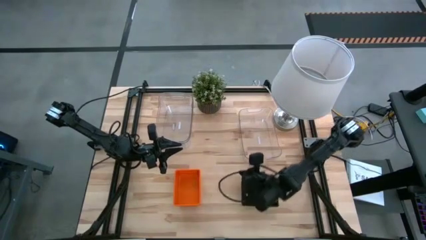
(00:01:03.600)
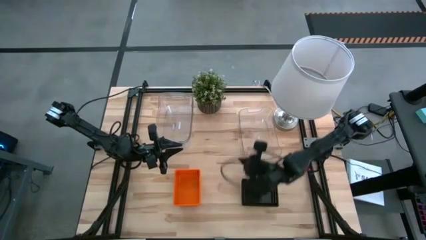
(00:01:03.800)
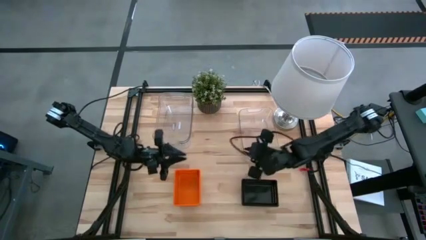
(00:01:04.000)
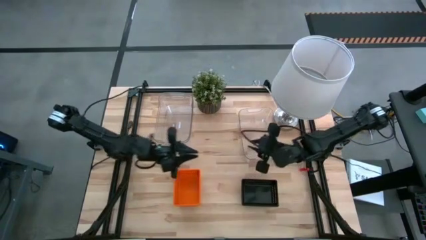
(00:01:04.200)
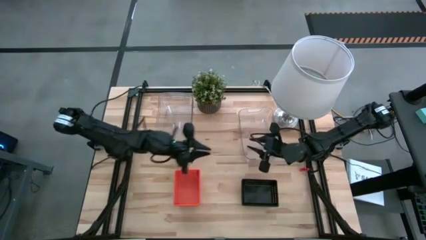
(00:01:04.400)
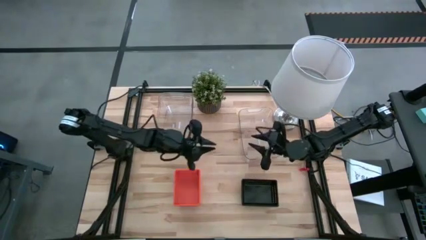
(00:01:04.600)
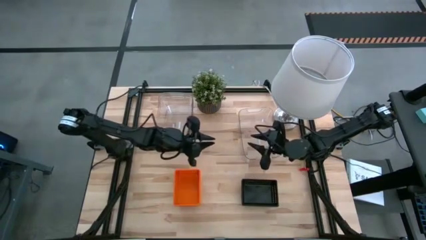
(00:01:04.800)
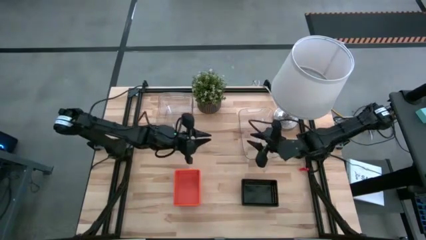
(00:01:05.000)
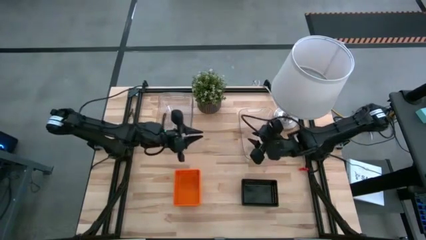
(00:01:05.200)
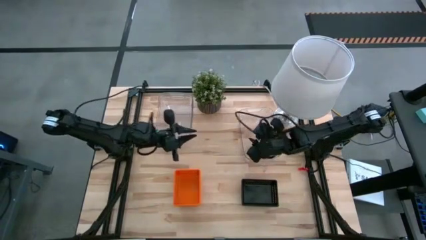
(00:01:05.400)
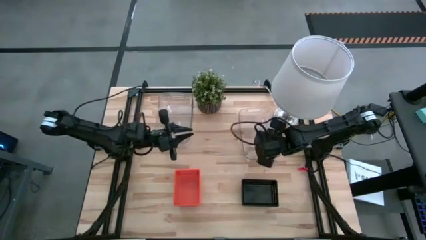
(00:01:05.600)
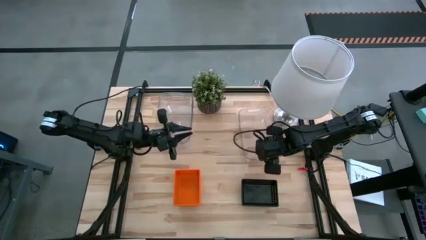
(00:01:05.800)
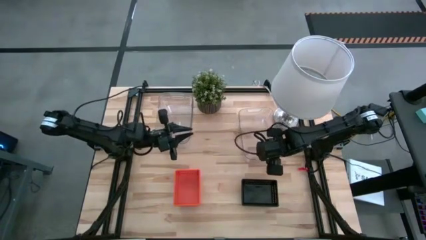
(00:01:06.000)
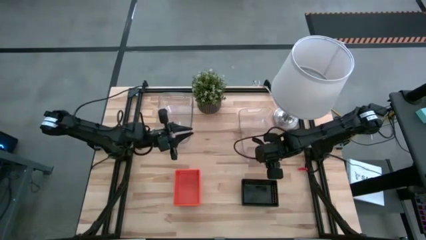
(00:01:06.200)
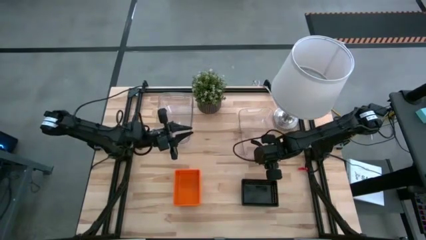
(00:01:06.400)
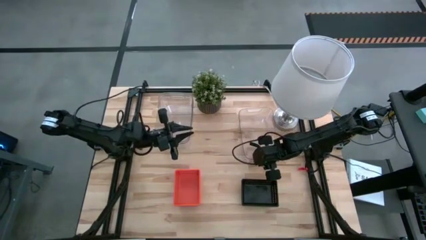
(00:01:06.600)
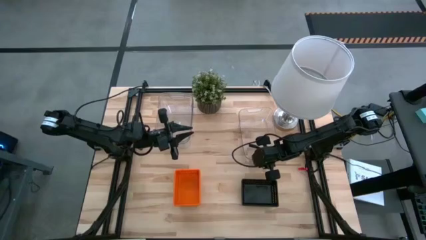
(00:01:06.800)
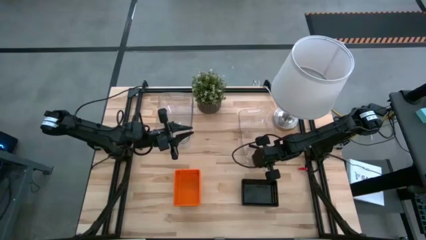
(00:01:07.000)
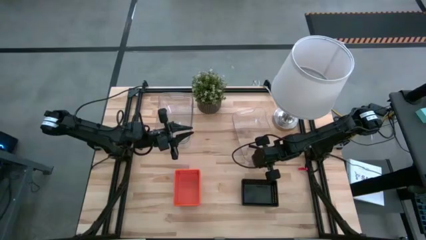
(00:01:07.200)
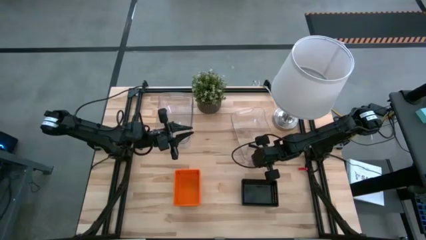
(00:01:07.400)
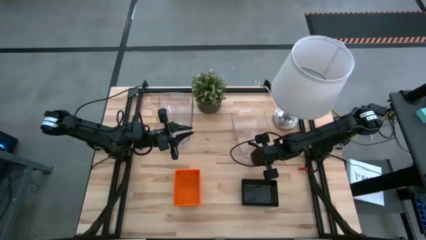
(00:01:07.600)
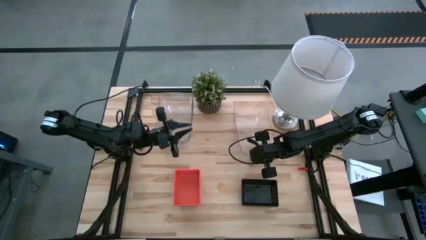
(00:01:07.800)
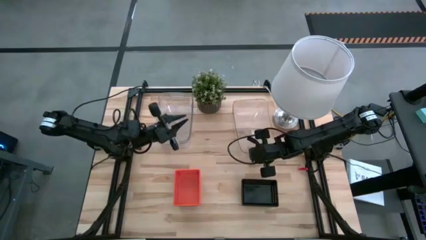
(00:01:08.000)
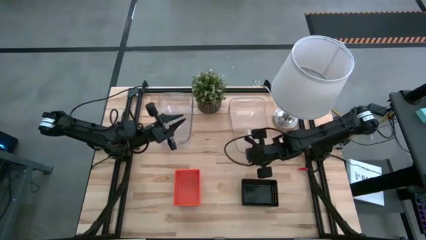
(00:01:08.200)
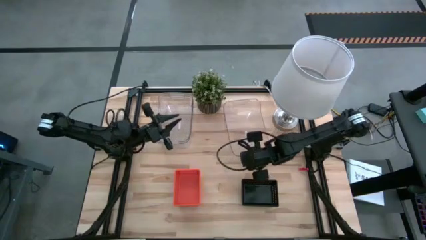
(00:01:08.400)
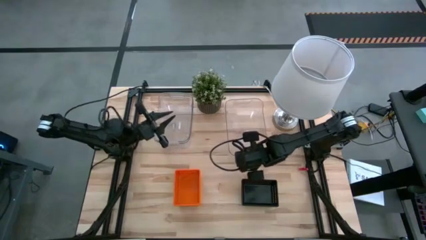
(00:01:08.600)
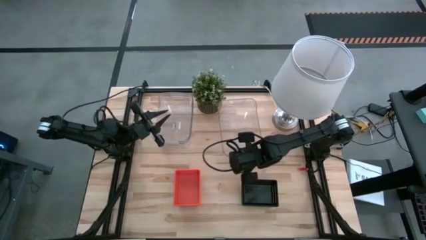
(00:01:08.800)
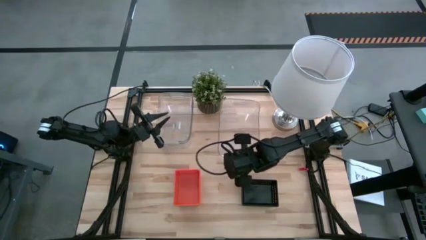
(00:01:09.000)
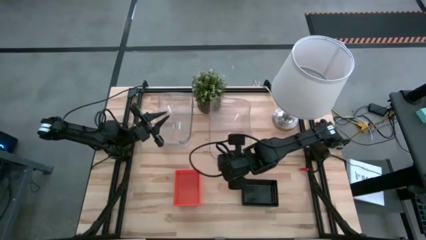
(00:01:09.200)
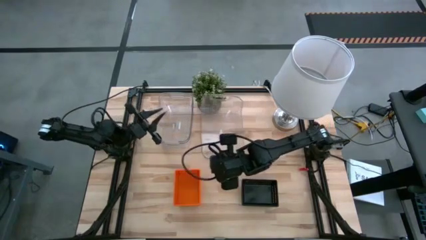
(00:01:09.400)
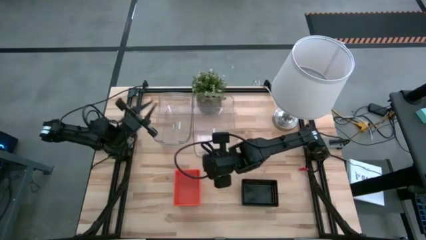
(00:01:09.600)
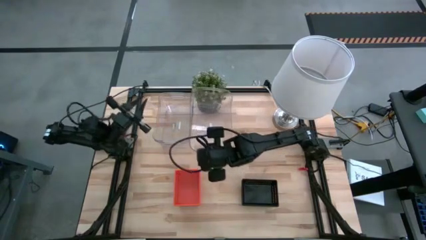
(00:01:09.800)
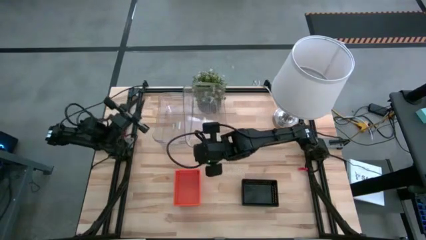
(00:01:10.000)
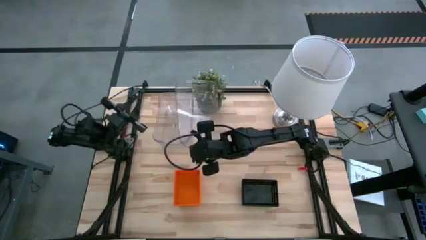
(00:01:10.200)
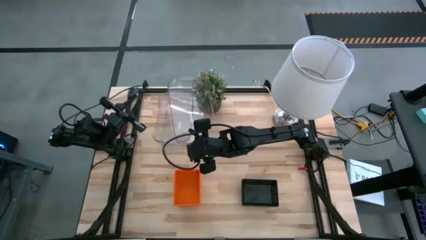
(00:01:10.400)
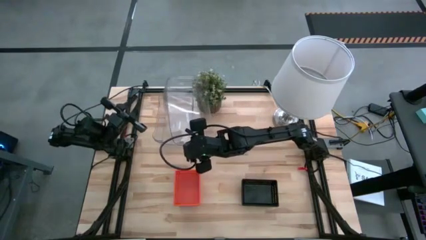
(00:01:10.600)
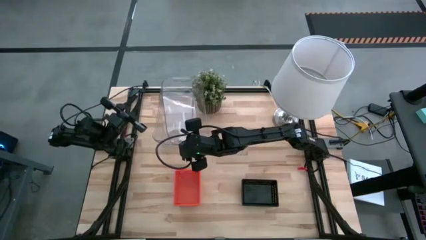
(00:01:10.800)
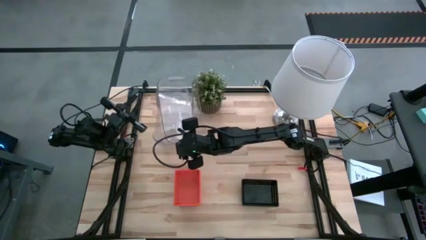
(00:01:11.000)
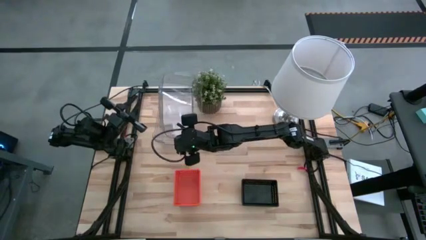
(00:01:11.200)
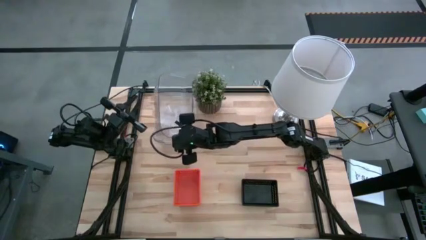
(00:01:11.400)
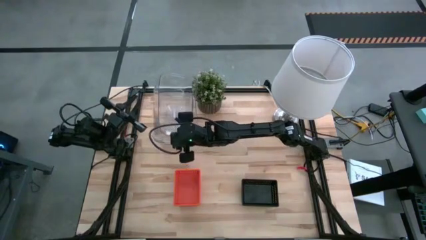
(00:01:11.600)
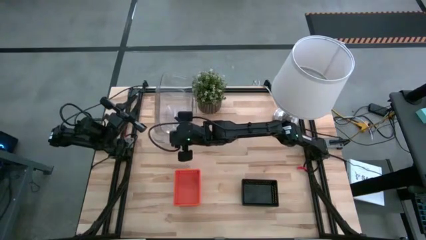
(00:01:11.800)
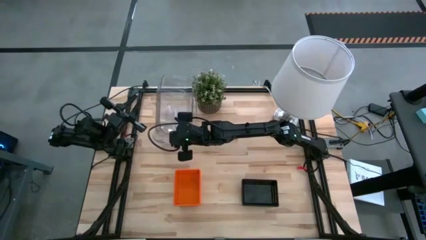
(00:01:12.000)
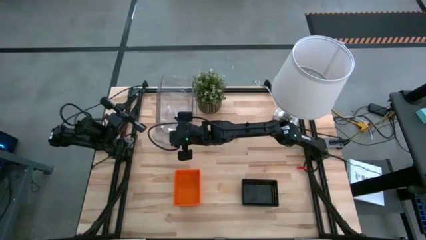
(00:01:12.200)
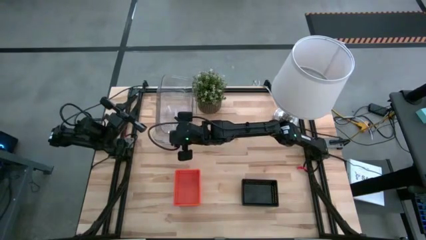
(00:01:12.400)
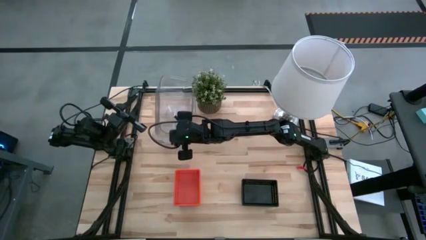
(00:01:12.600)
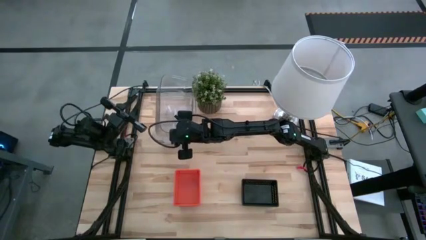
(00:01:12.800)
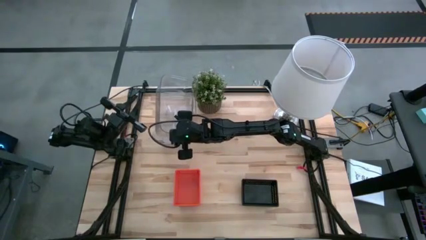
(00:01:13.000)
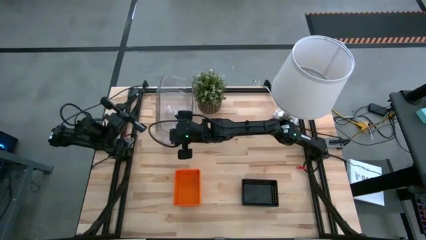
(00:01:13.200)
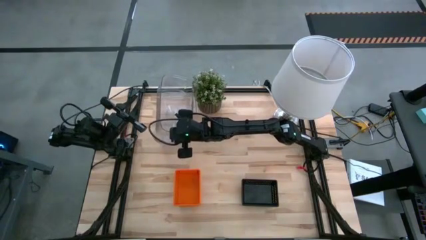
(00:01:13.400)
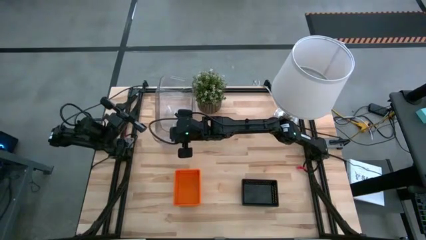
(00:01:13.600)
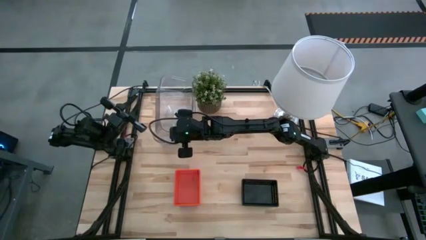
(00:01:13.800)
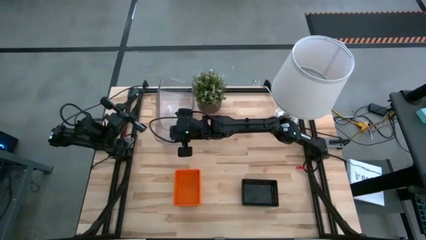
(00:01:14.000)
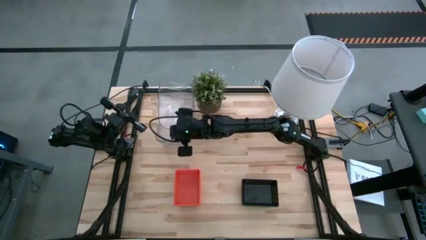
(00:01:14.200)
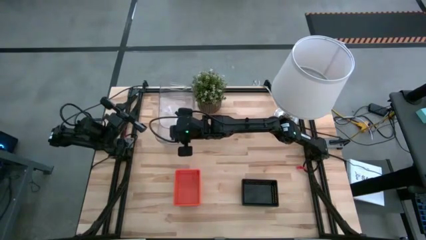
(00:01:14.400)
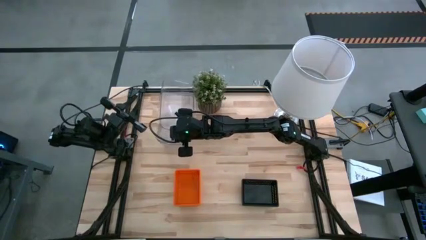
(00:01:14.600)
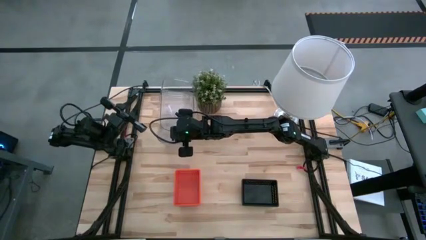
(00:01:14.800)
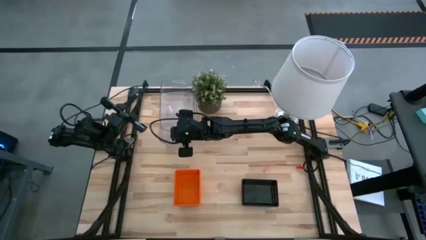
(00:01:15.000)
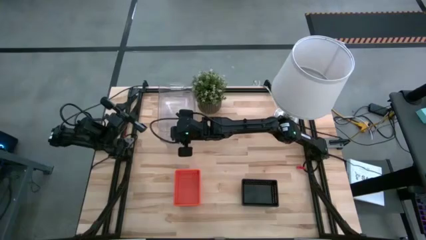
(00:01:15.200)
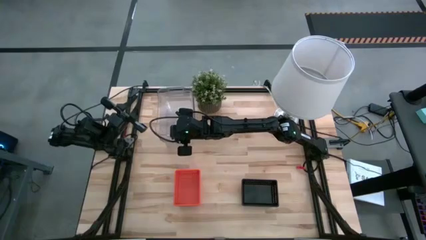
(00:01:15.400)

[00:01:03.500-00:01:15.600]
Stack the right transparent bin on the left transparent bins

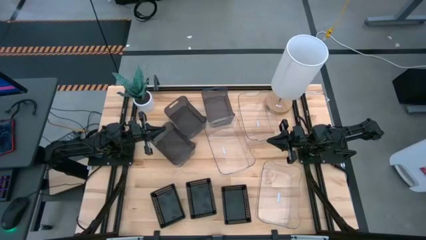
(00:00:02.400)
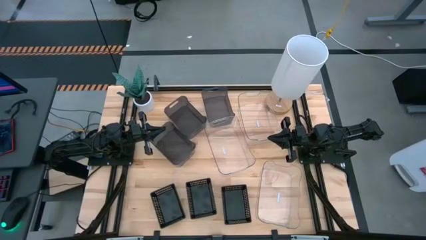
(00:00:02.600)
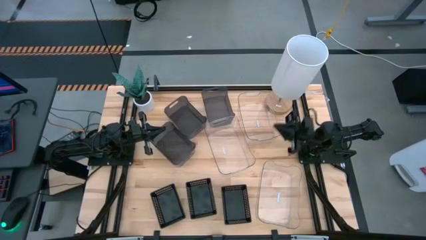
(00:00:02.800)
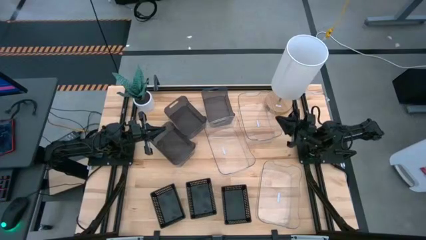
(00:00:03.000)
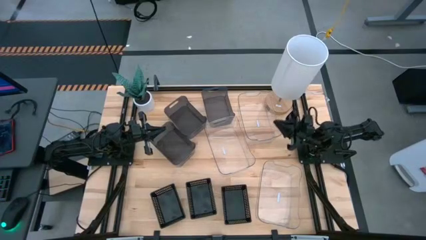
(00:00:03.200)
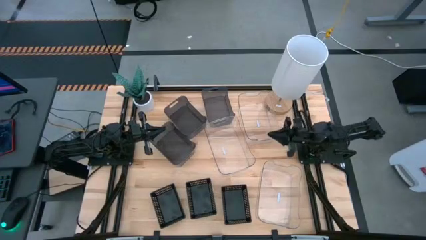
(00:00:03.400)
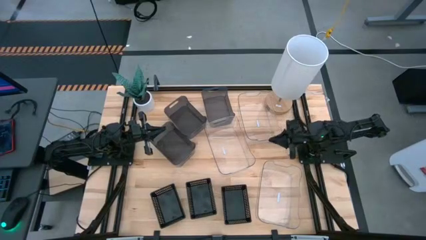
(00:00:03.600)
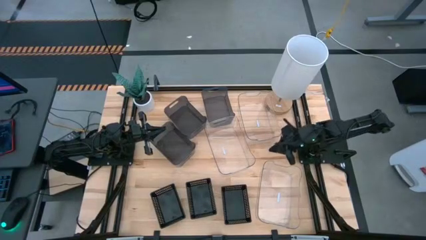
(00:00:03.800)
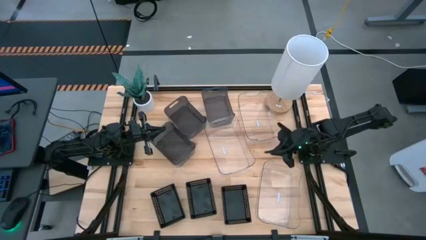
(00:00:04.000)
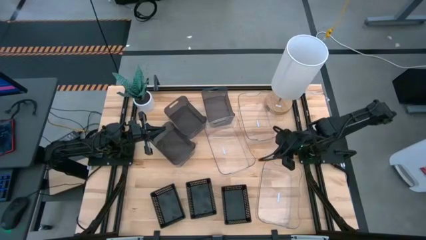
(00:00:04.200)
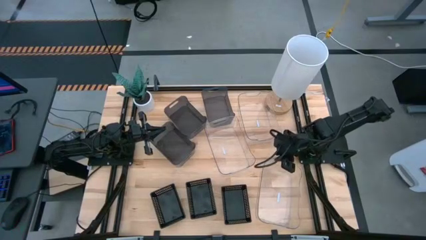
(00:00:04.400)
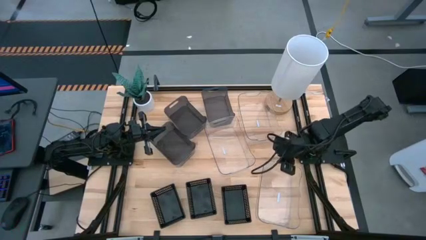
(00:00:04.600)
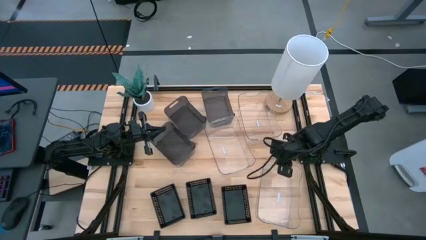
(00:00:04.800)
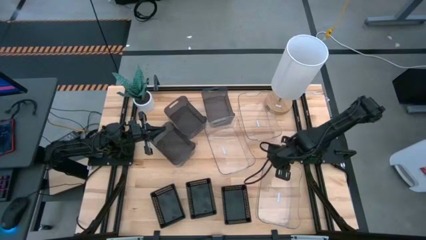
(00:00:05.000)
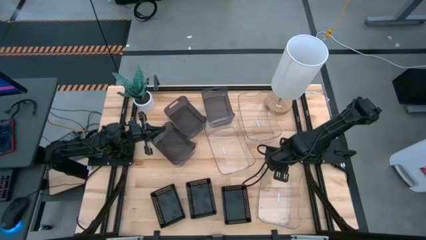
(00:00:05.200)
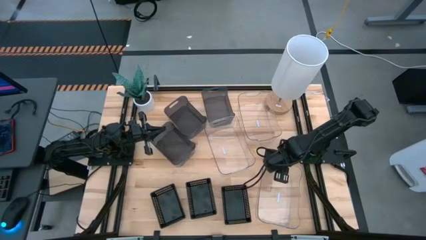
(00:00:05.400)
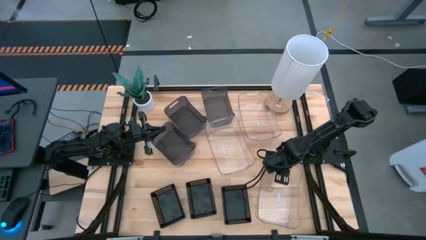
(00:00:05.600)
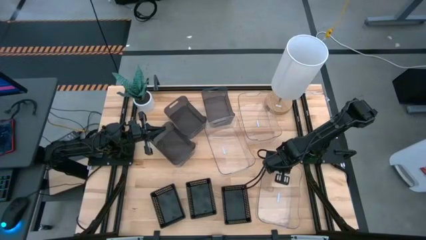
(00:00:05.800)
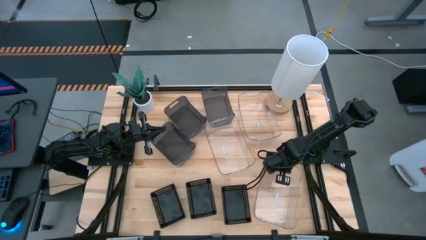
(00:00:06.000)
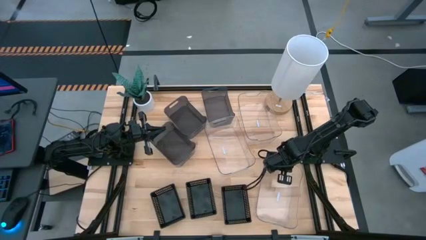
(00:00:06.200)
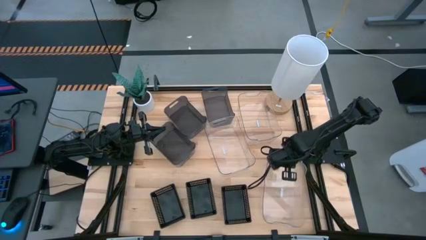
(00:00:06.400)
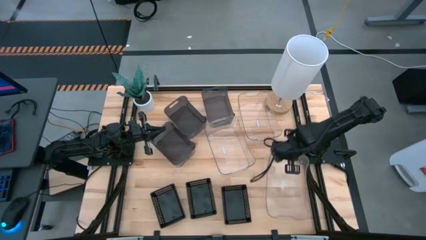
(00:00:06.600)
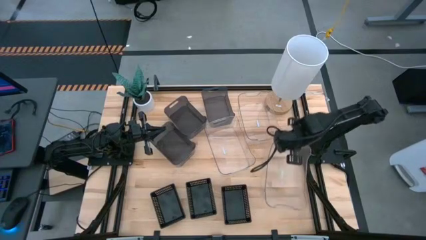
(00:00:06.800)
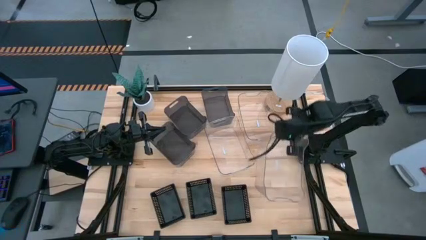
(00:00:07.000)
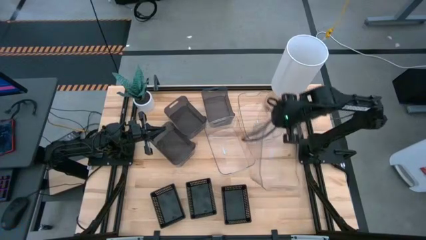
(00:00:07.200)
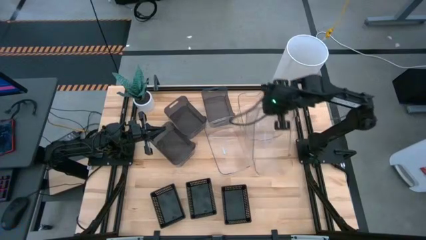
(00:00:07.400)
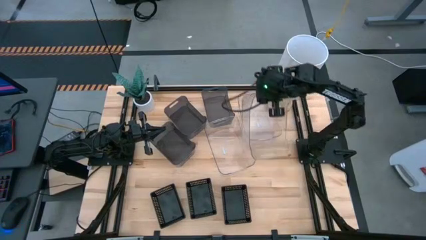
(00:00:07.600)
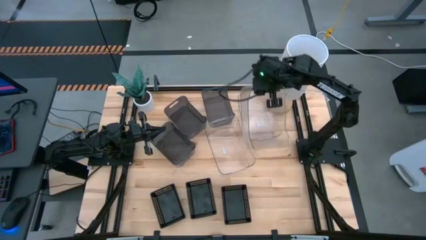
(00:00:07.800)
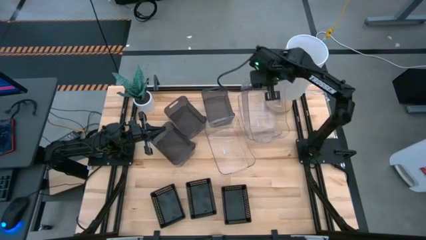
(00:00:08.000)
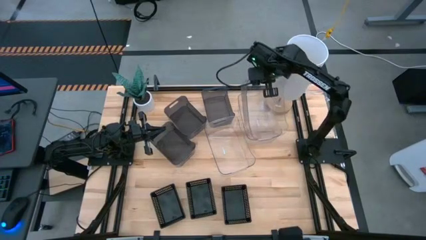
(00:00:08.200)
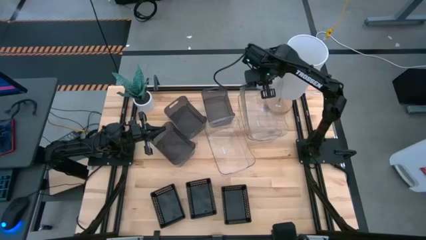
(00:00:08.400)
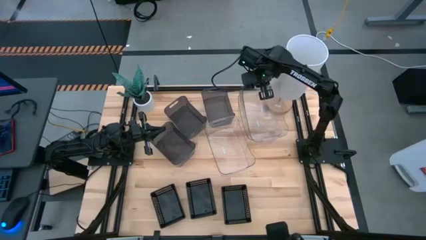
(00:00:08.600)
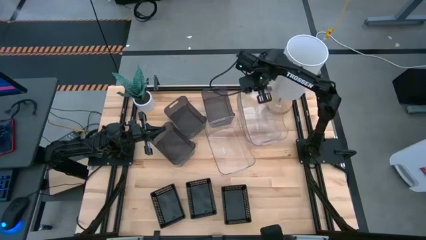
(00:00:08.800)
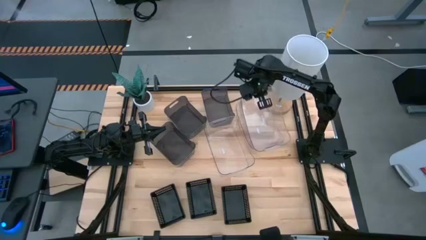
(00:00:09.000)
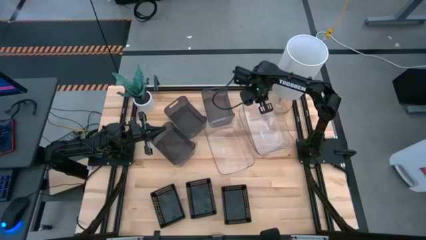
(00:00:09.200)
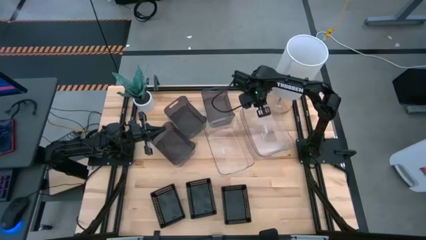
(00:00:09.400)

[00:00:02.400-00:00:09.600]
Stack the bottom right transparent bin on the top right transparent bin
